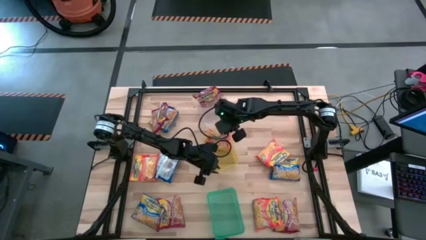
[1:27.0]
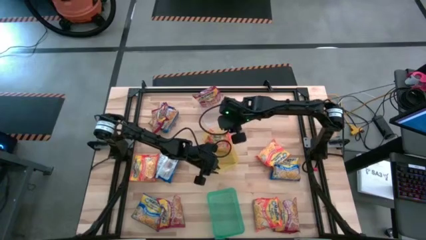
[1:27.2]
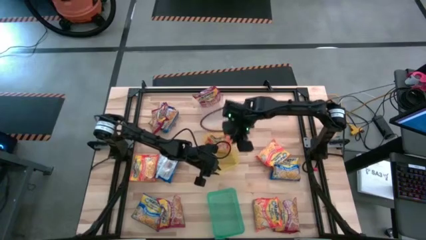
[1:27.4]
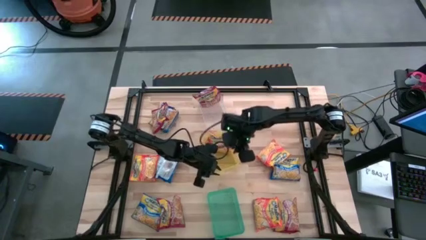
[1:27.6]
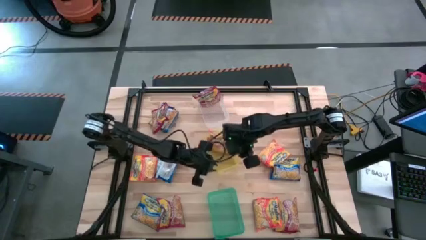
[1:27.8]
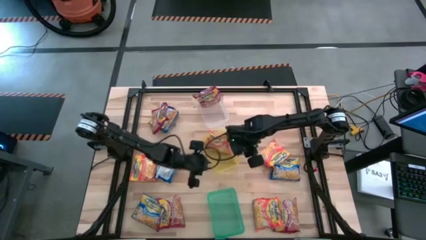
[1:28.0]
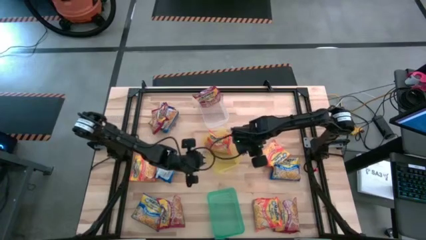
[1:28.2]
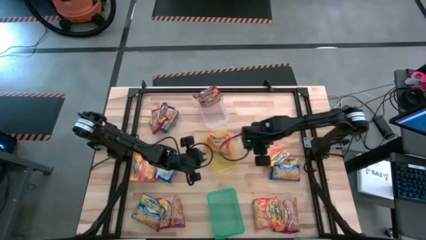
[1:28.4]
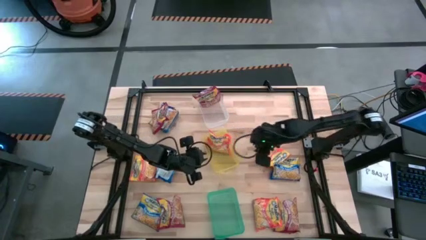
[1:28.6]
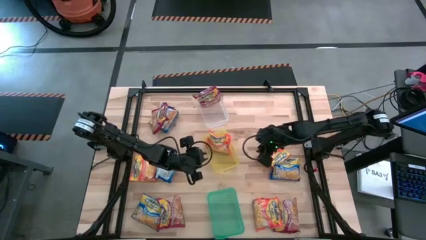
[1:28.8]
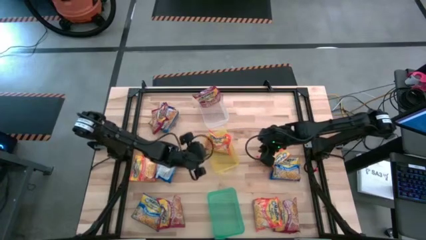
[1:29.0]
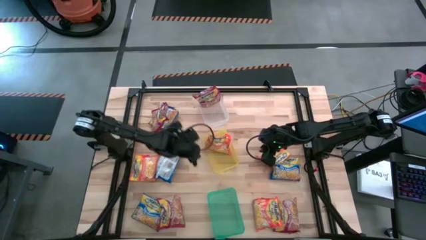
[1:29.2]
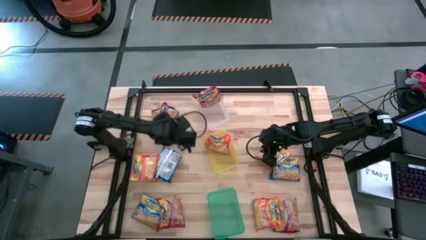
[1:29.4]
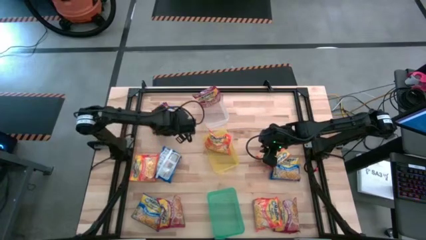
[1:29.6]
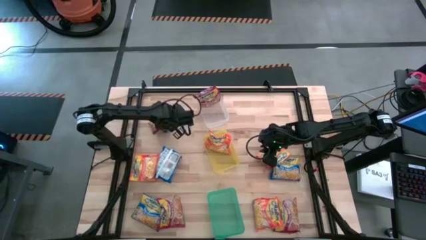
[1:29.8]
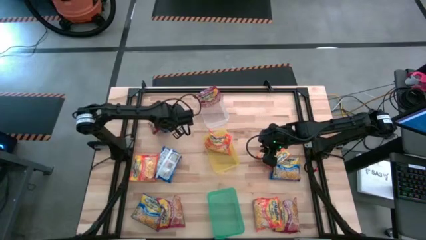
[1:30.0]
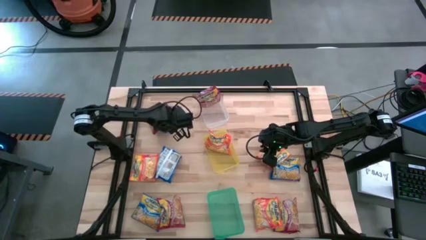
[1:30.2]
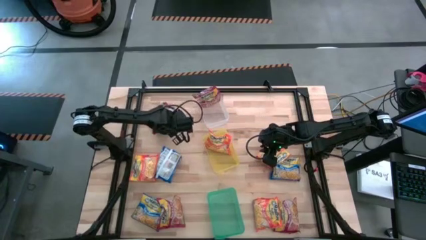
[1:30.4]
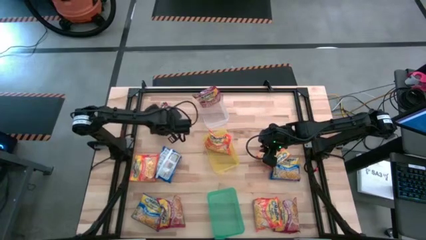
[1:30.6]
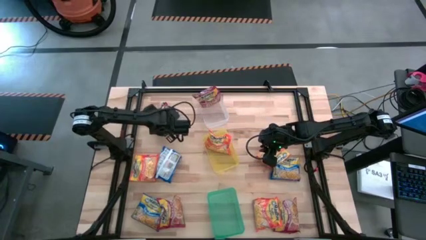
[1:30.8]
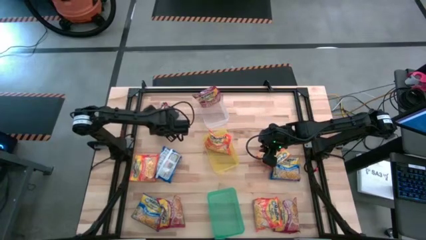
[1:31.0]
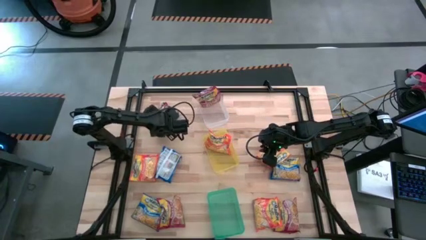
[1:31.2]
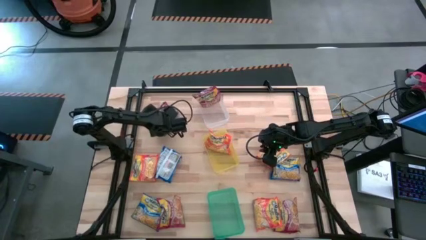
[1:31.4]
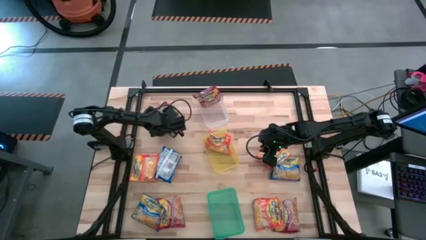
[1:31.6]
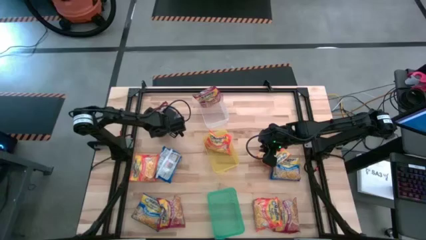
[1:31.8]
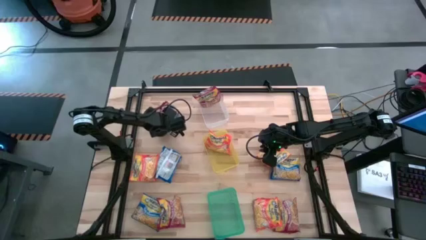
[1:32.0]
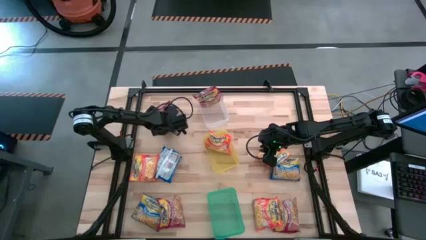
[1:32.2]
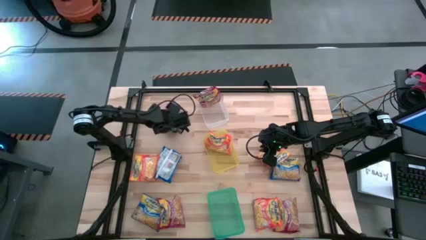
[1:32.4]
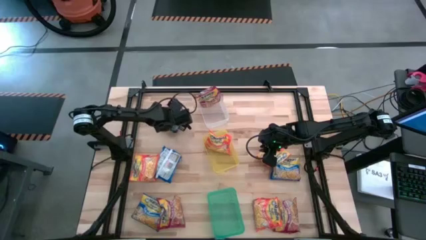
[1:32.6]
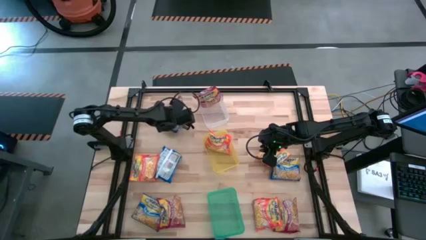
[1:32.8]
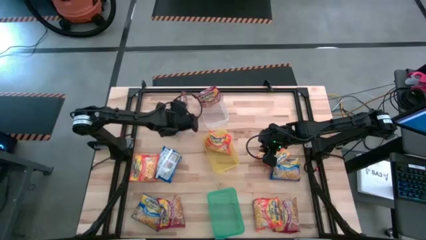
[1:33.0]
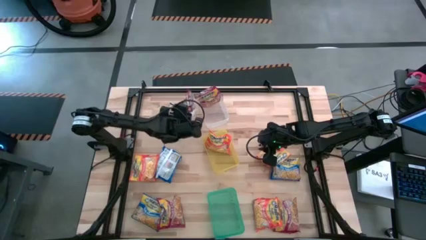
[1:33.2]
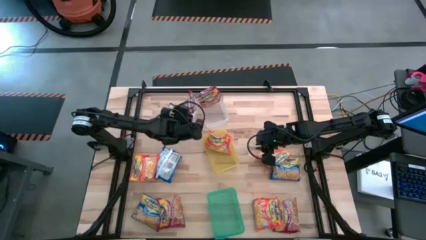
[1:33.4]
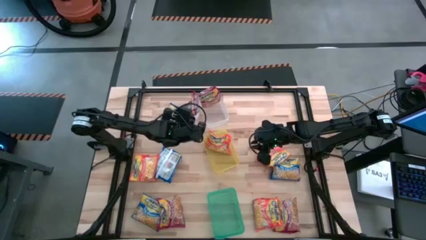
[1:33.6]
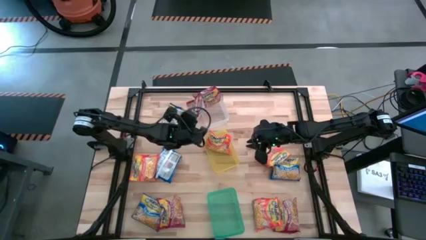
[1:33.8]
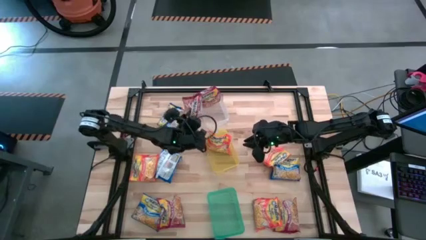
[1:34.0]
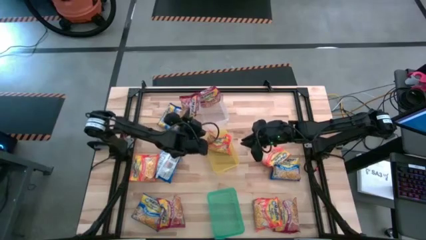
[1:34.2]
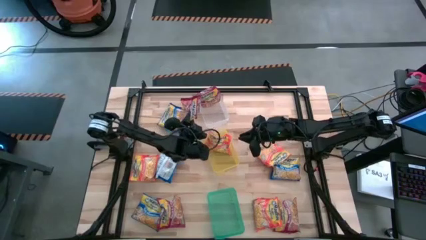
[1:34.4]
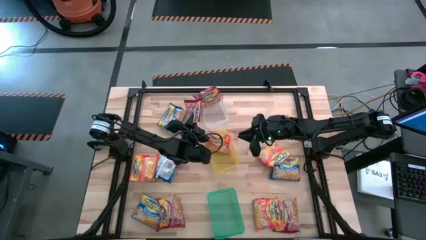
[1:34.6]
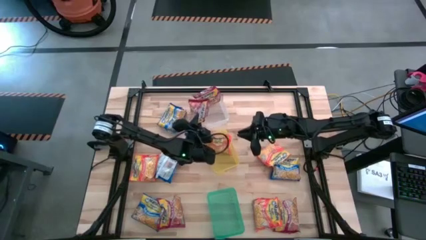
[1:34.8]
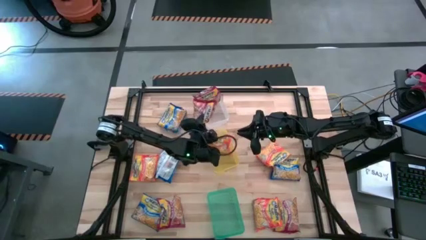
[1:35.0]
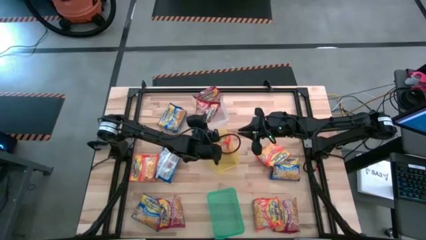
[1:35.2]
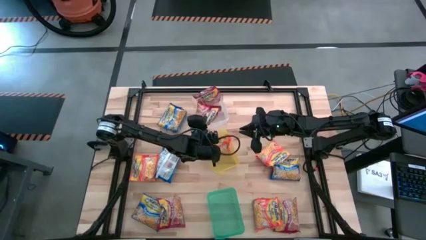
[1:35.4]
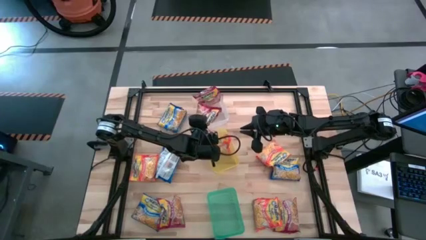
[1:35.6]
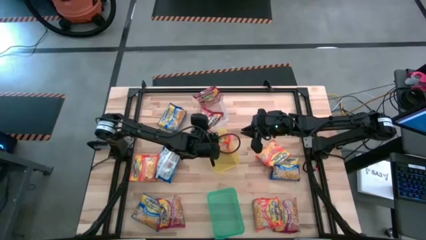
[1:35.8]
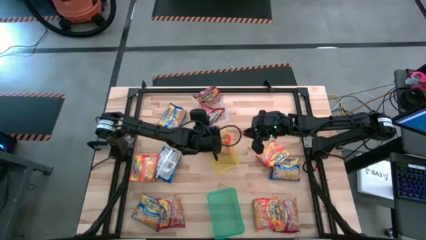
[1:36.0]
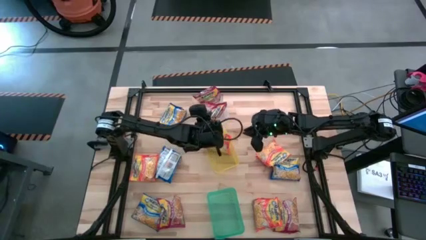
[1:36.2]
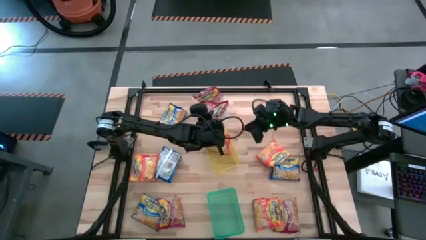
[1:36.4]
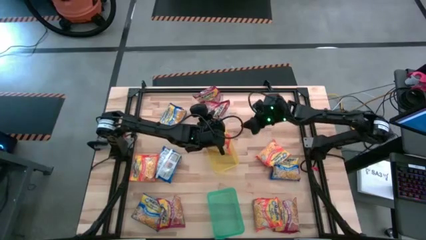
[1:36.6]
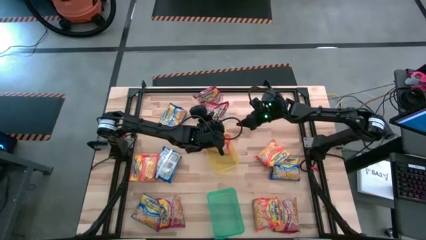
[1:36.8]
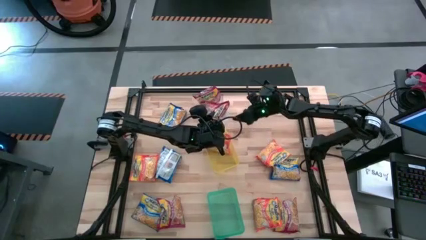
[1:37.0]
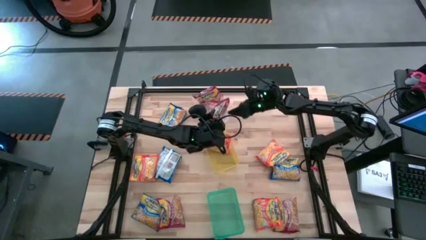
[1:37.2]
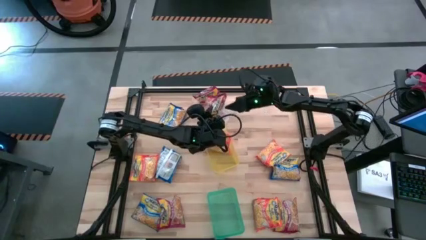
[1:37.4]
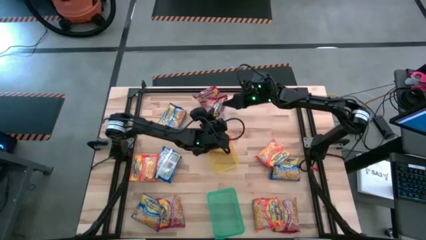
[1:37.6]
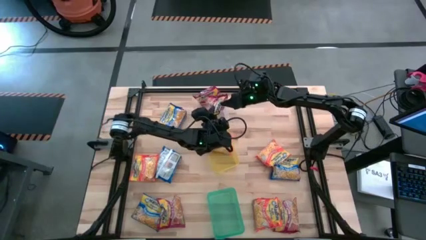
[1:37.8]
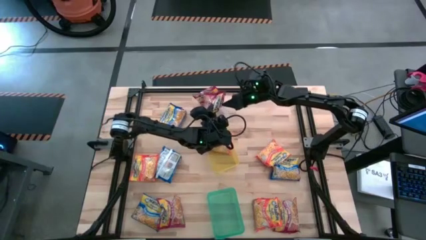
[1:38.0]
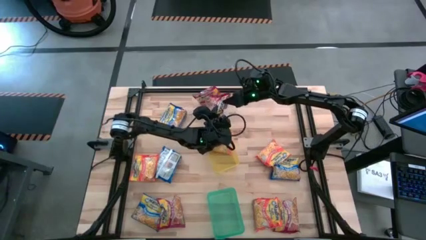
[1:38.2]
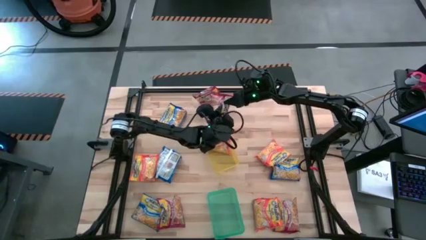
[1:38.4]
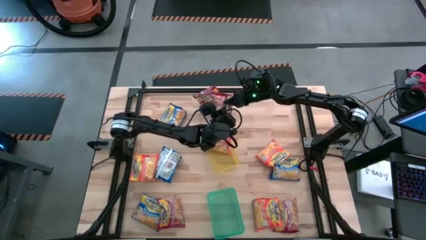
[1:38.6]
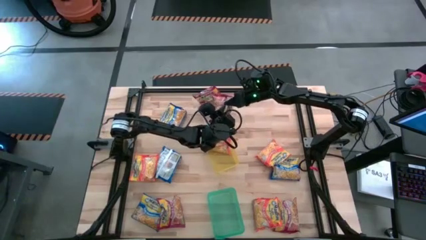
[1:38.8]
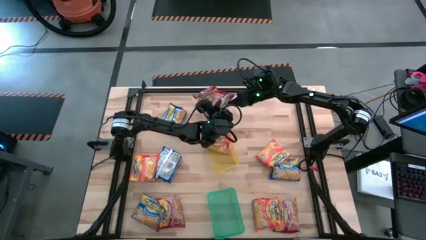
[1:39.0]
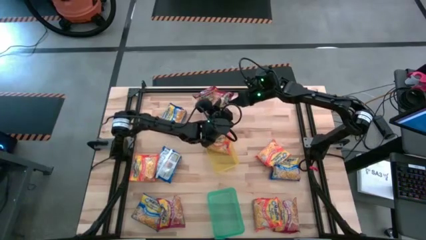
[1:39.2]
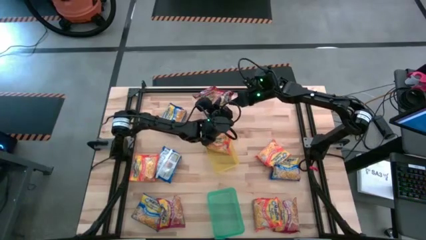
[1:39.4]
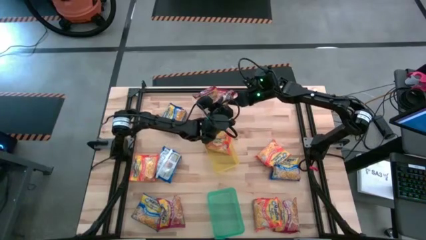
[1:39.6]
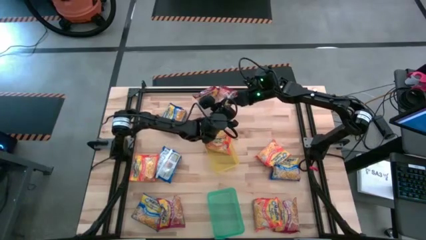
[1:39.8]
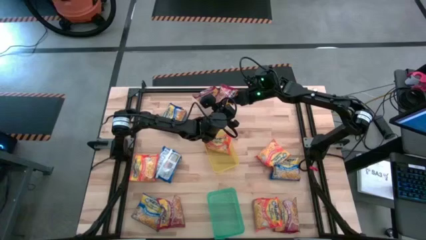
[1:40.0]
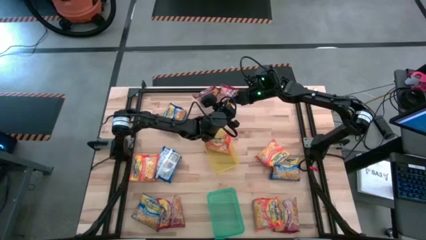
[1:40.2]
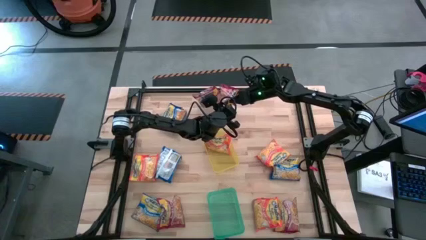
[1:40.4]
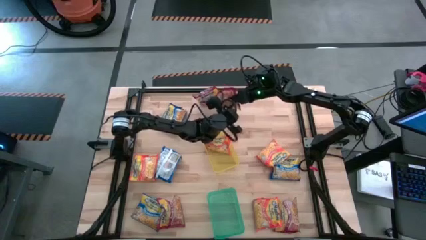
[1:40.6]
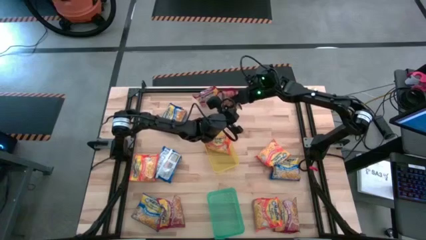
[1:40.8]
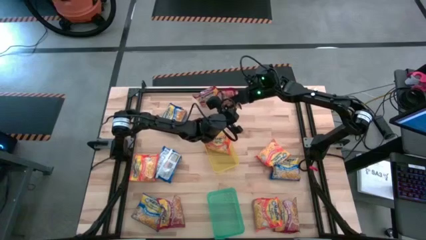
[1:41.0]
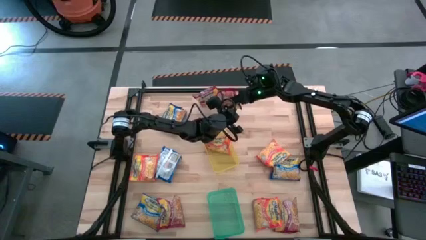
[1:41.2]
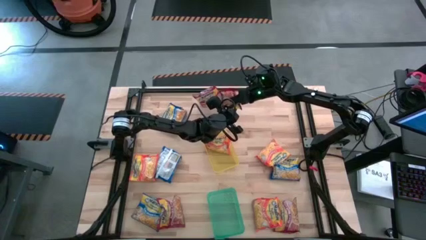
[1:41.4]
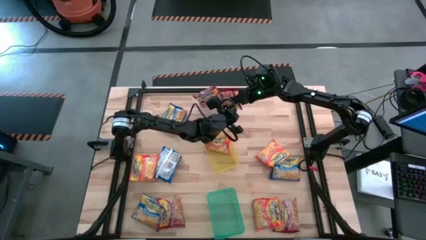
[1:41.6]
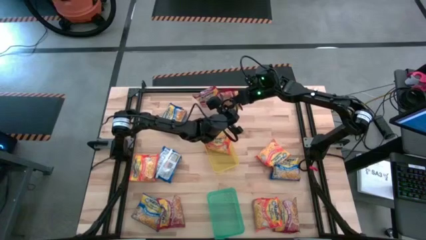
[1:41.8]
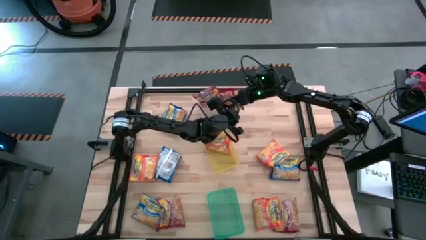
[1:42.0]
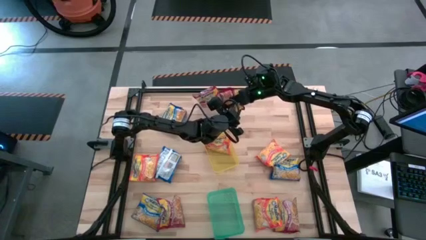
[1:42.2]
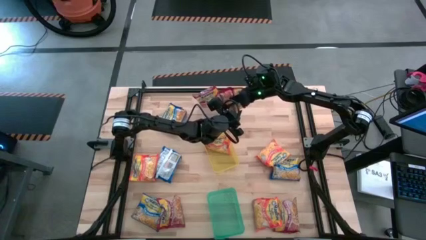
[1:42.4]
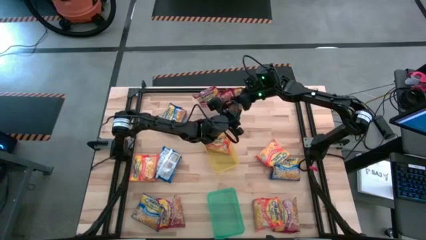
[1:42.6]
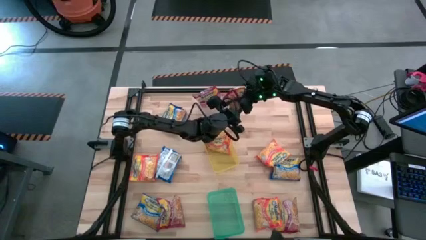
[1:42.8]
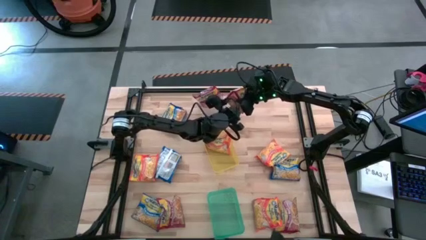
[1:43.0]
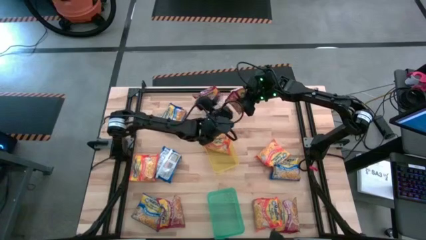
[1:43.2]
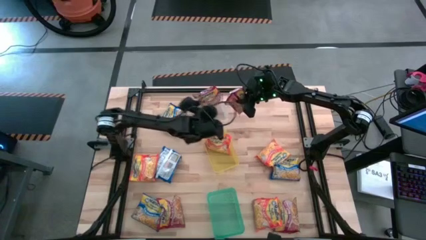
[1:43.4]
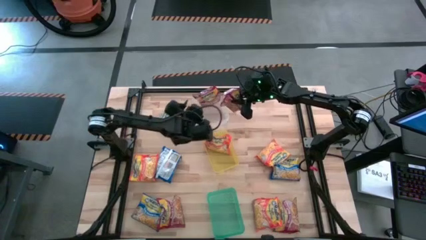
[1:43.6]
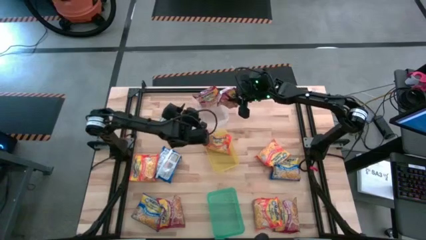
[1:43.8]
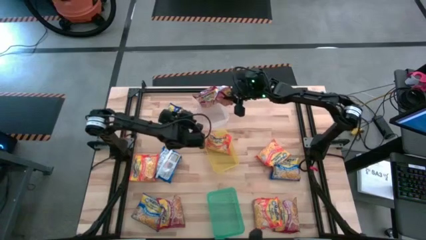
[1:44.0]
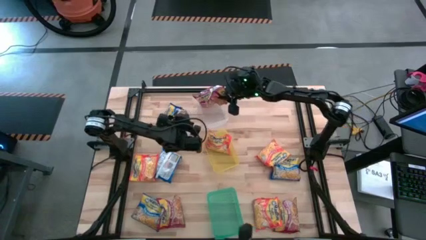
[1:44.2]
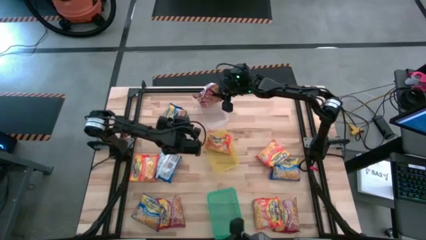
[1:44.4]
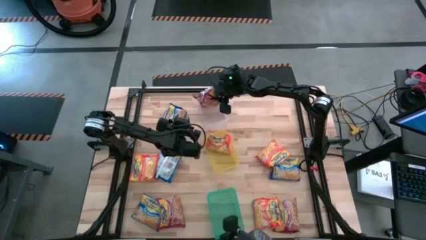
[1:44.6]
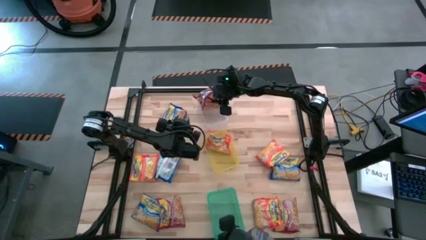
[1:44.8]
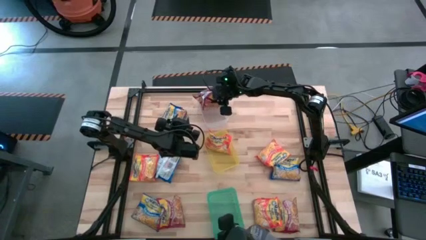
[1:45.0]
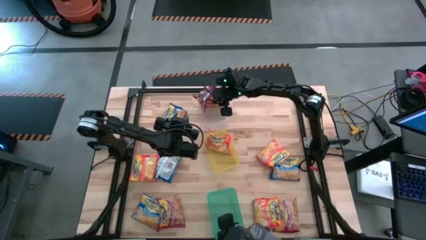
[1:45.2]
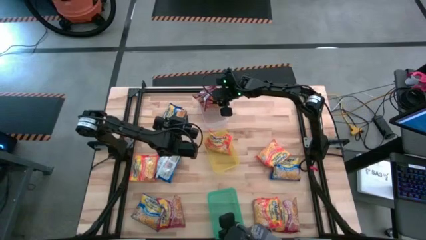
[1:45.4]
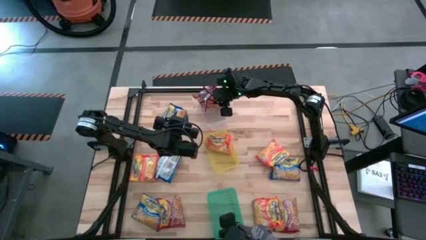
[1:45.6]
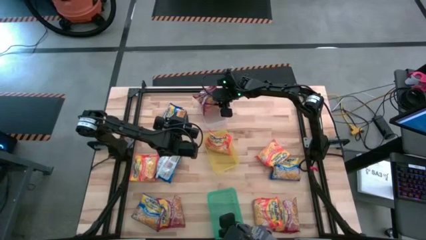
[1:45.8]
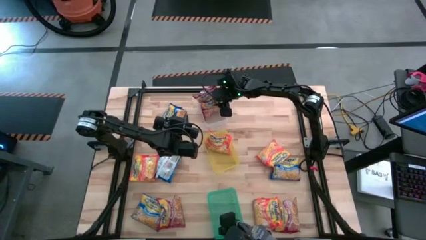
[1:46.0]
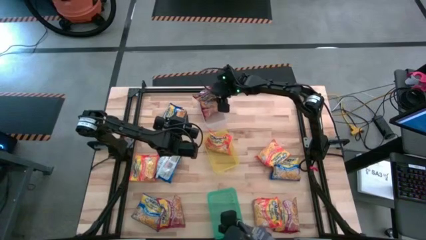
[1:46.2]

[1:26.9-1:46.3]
Task: Sort Maruchan noodles
Put the red noodle pack into the transparent bin
